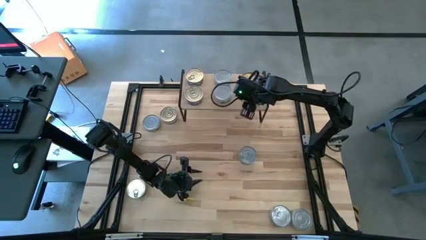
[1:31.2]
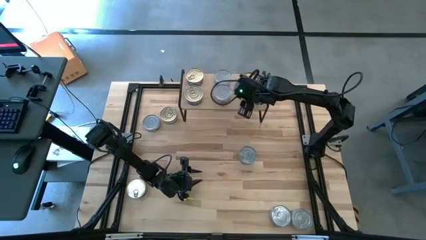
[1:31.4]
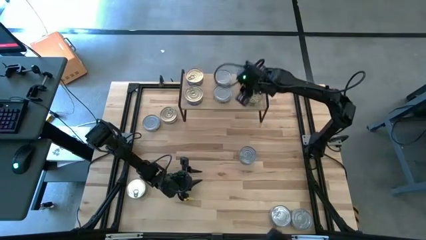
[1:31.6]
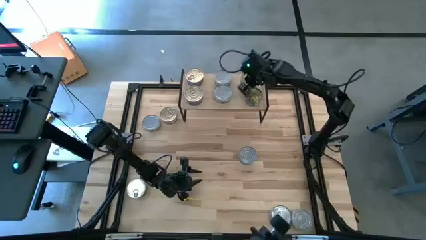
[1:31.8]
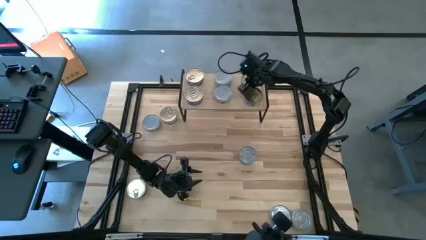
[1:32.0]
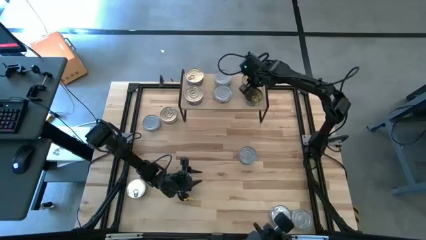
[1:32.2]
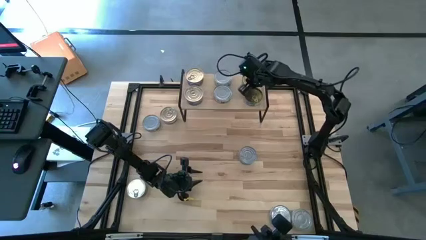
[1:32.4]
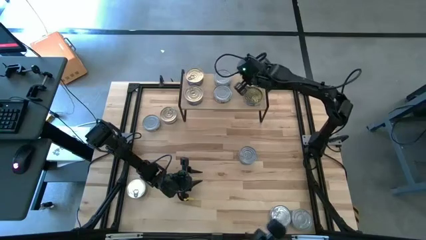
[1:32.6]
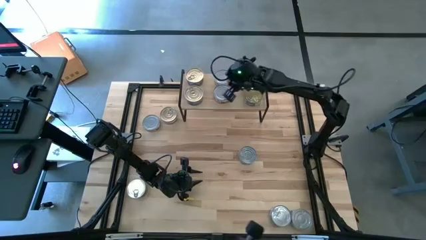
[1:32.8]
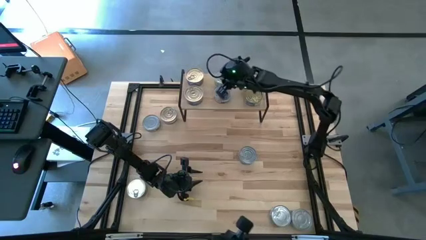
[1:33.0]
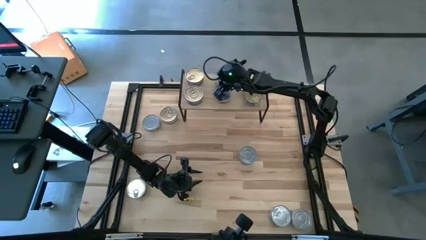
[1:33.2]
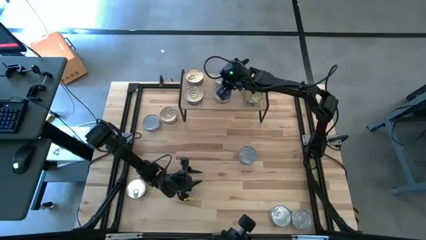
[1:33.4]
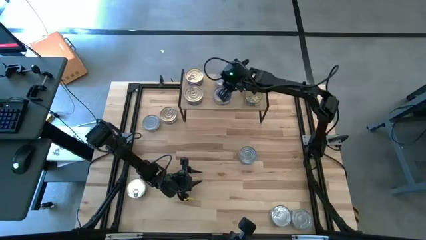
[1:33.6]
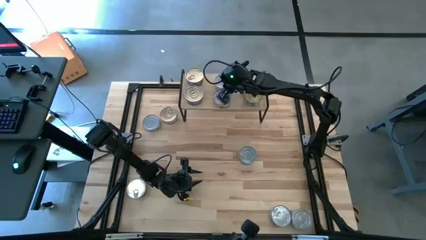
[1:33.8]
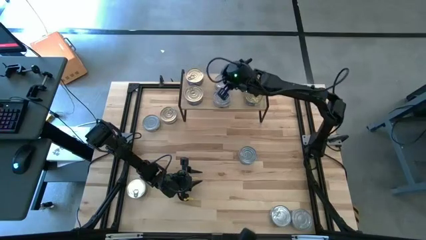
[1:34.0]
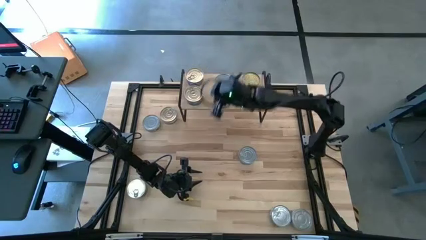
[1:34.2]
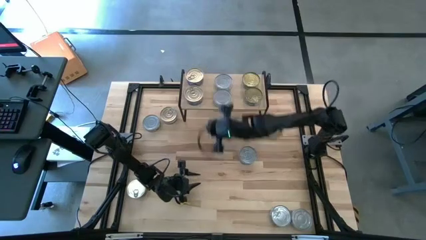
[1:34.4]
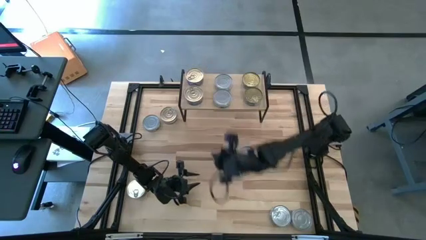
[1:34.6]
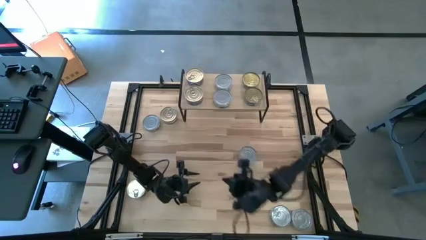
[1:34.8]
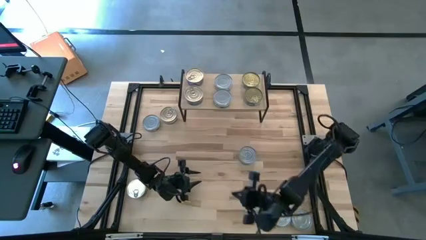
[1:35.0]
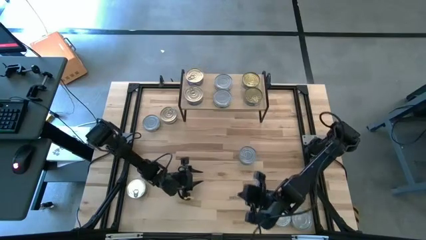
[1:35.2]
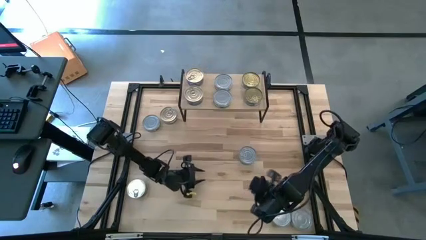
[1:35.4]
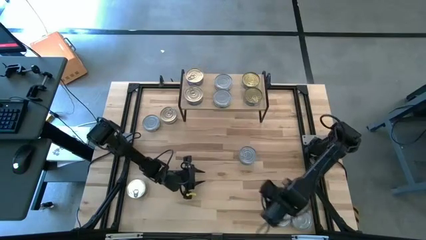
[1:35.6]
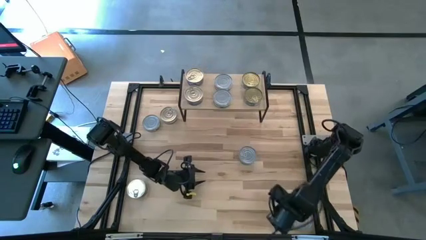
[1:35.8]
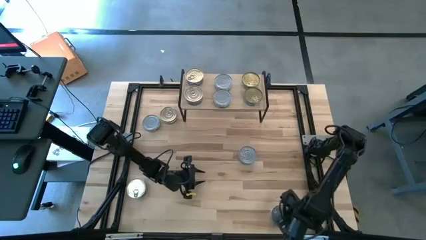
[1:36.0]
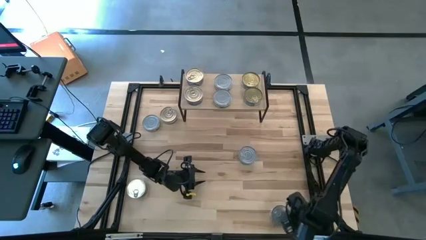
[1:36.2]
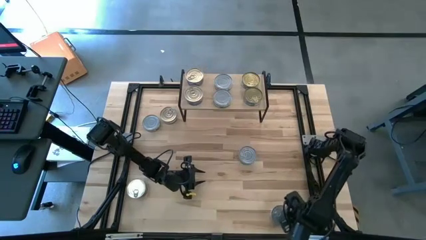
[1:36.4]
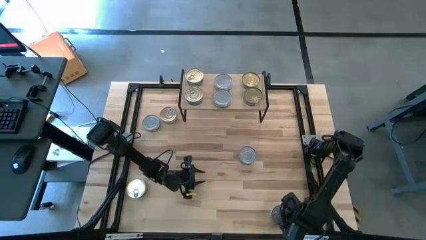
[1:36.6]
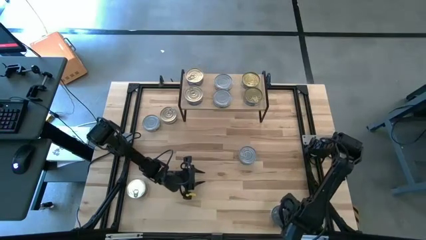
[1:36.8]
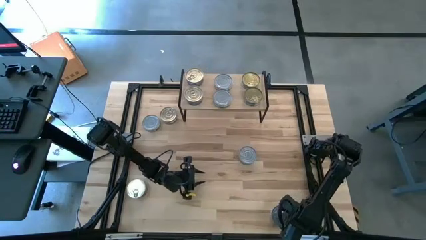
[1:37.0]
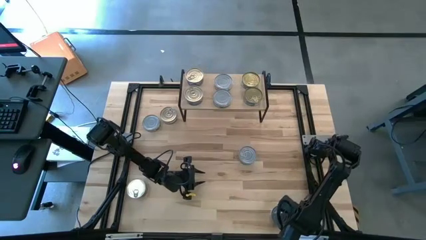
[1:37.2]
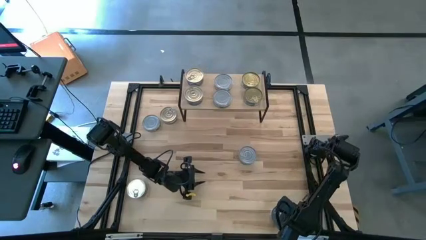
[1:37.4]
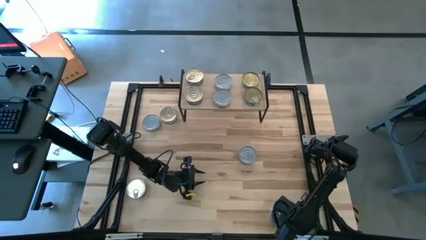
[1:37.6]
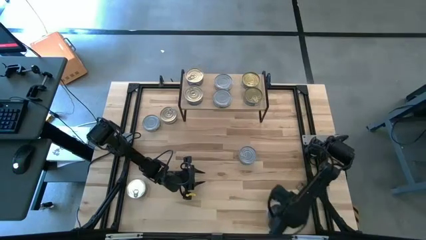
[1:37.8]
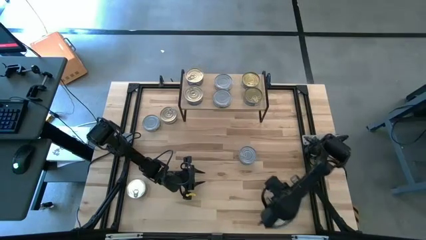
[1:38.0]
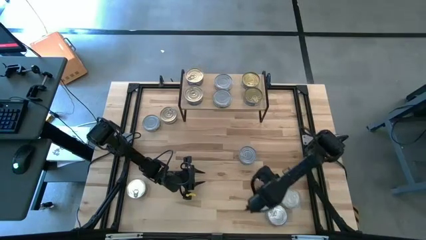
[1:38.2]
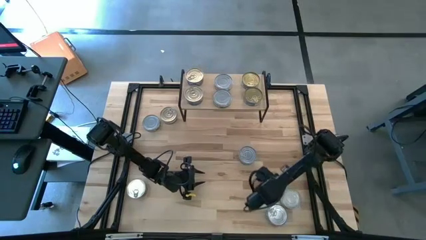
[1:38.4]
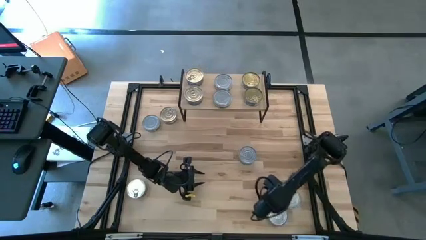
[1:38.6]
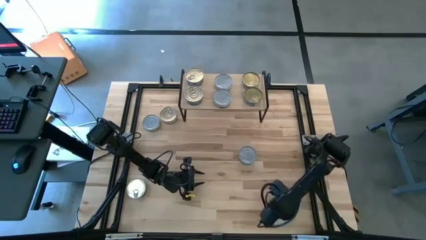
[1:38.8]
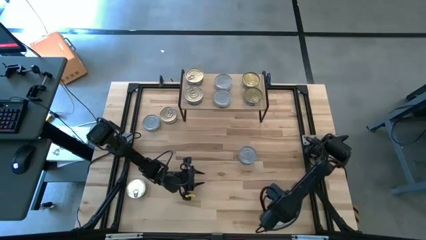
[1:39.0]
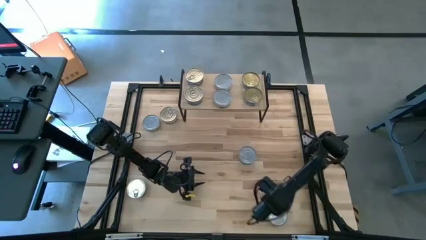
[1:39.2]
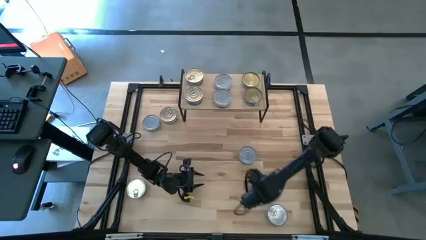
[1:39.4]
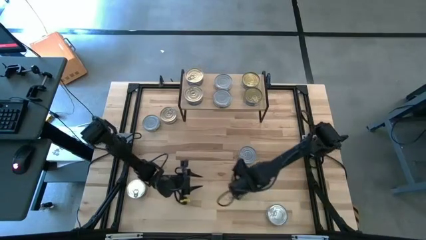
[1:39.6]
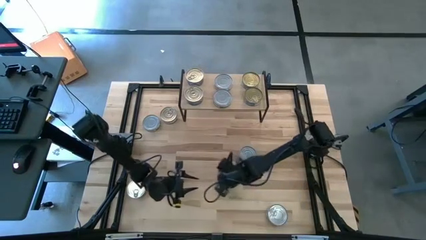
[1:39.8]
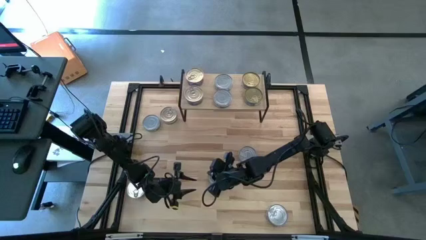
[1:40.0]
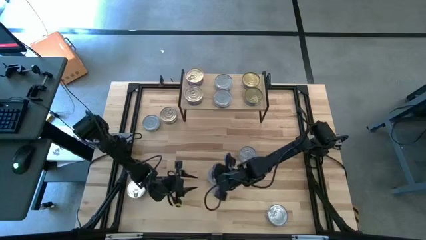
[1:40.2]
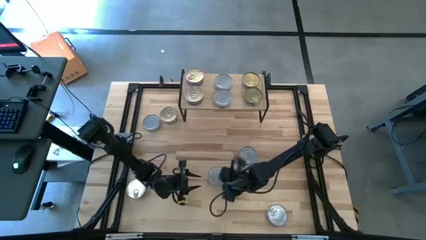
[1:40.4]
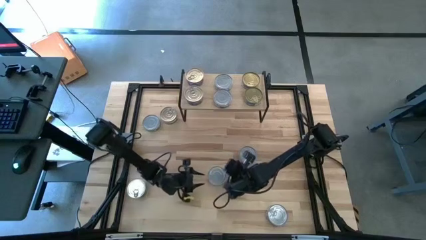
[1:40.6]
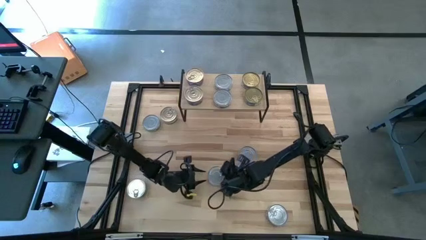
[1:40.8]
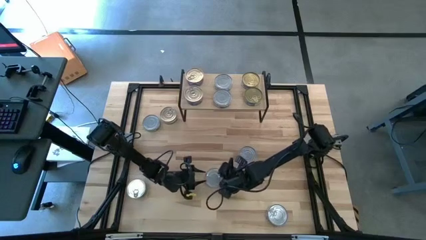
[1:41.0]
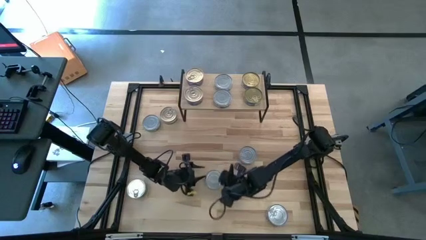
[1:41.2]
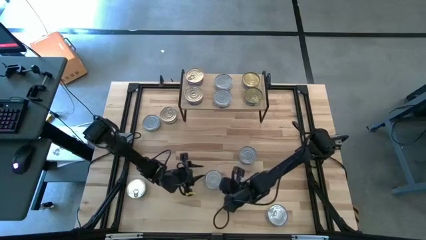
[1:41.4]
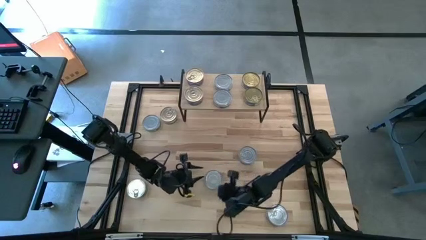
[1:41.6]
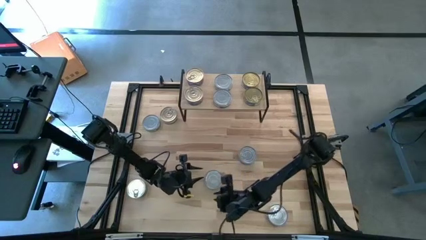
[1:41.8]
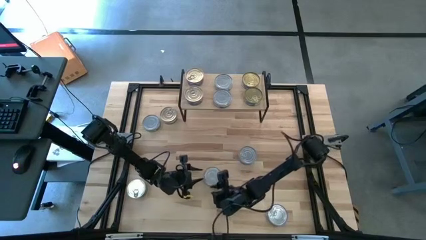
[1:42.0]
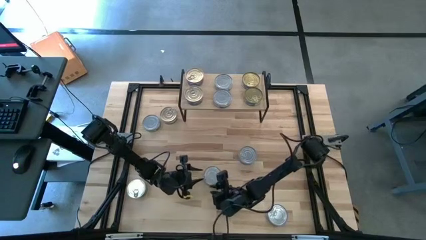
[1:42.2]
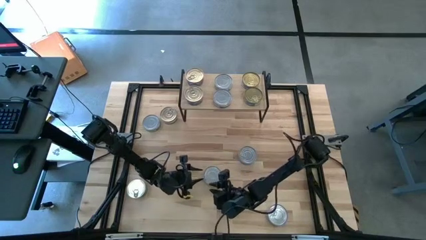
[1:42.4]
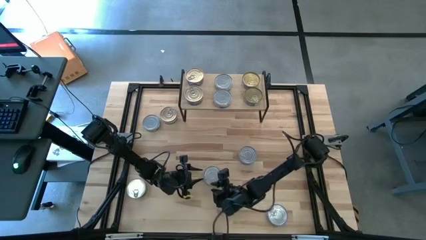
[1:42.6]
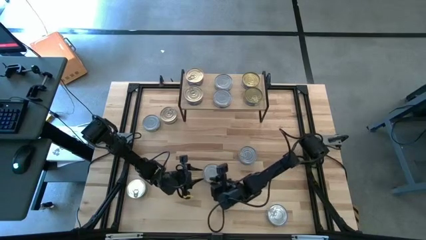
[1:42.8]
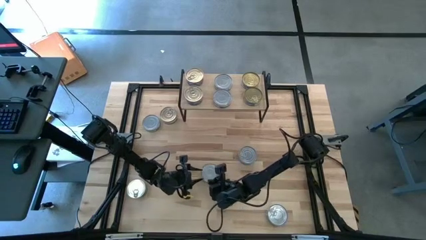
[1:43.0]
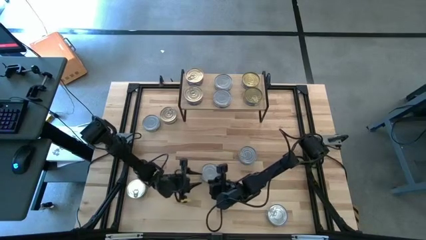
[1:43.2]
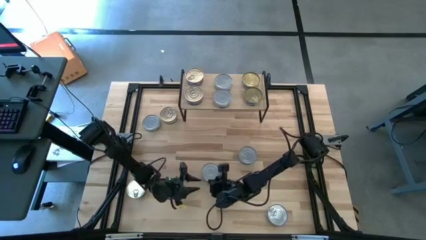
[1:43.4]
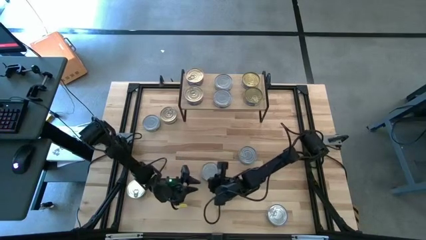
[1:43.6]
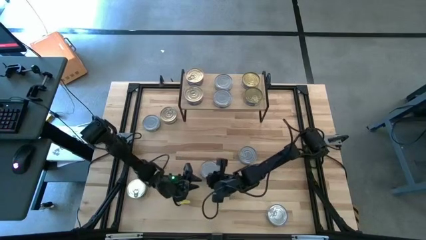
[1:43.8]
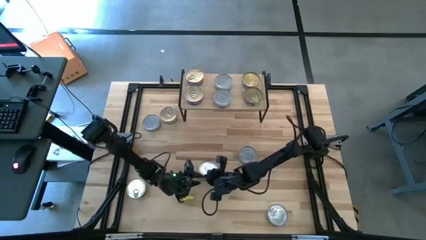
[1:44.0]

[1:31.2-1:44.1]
Task: Stack canned seafood by type on shelf
Stack the green can on top of the other green tuna can

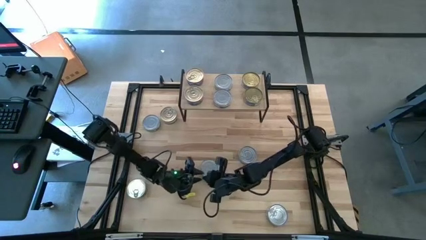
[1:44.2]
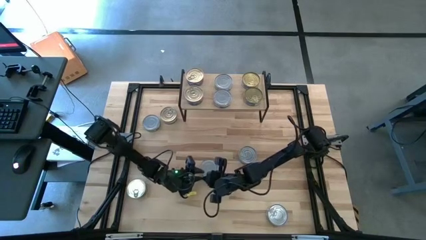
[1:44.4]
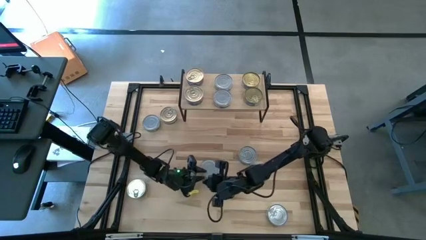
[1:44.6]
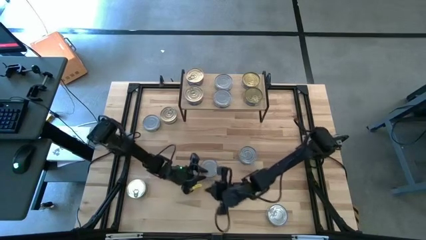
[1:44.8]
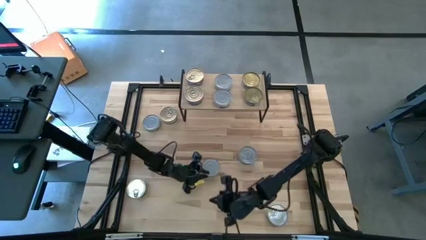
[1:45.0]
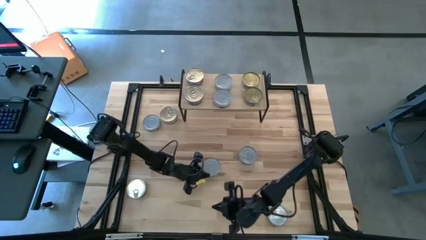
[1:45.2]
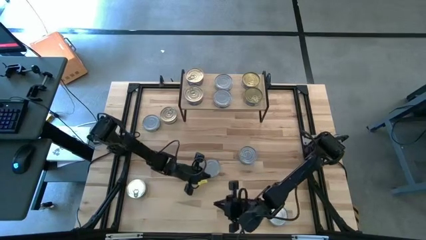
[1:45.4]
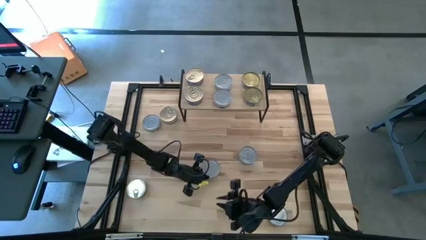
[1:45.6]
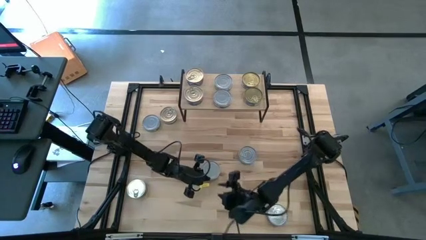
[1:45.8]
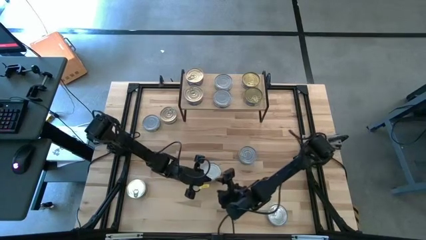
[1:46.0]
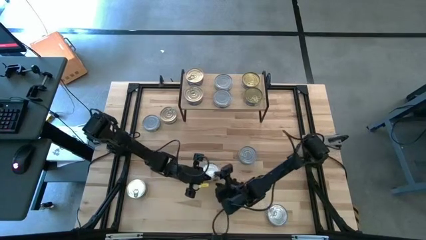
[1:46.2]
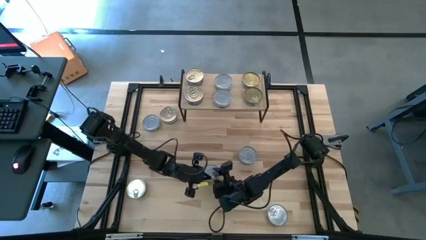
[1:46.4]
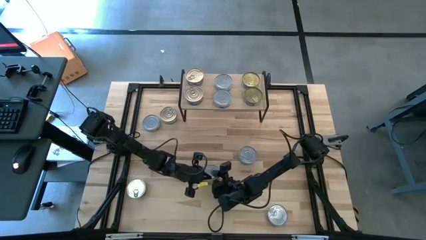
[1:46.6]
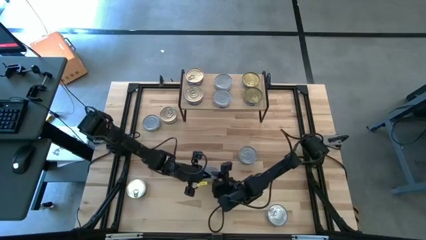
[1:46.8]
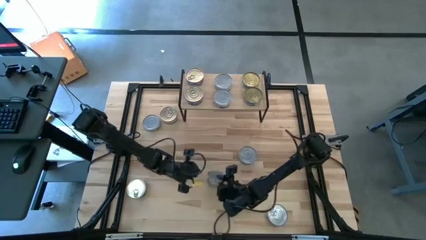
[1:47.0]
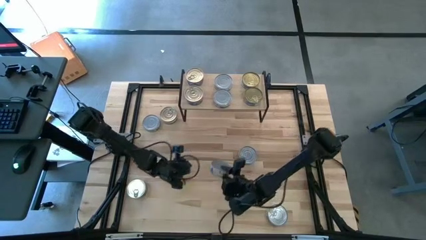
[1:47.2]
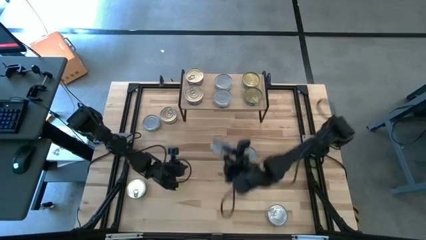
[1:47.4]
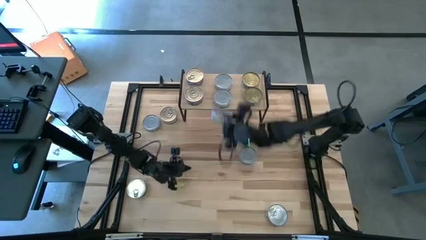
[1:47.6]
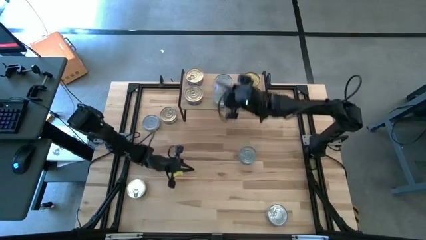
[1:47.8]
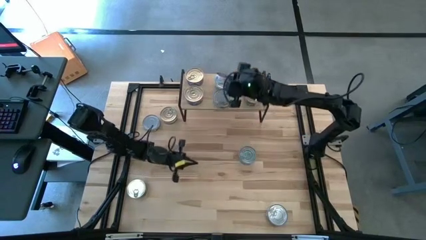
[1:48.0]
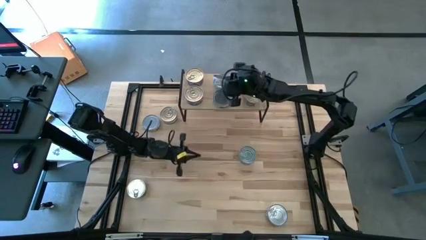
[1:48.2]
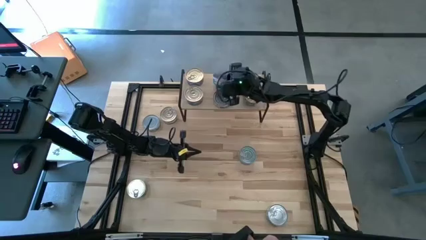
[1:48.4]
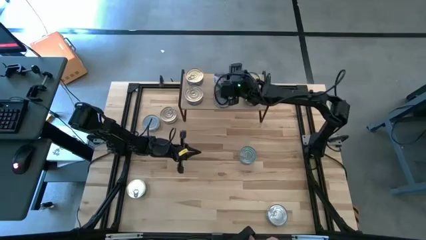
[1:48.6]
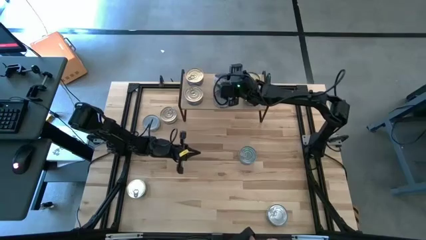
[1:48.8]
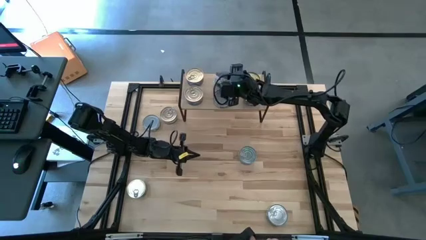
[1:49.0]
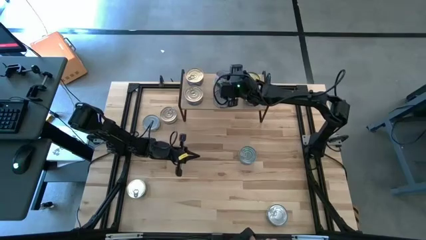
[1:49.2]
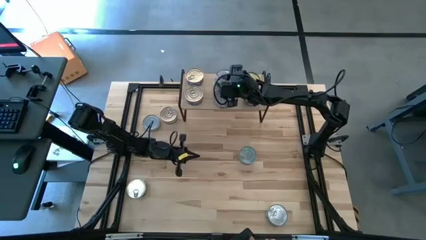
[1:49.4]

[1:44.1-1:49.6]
Stack the green can on top of the other green tuna can
